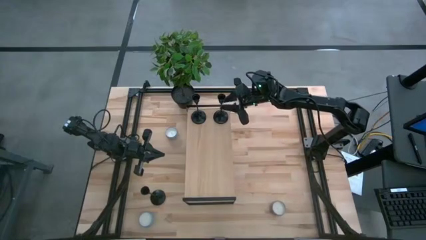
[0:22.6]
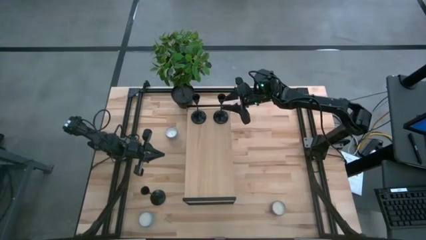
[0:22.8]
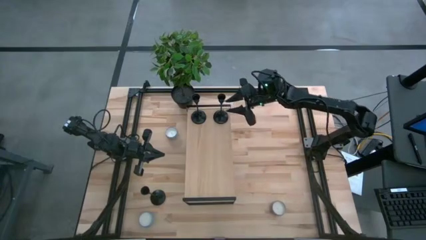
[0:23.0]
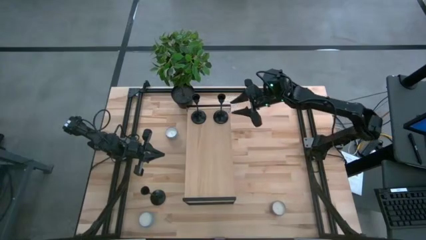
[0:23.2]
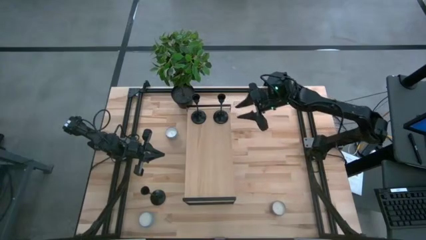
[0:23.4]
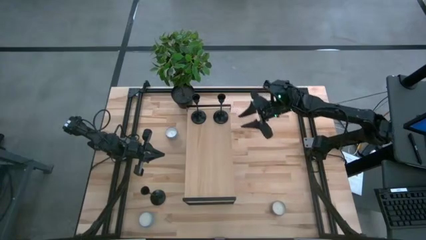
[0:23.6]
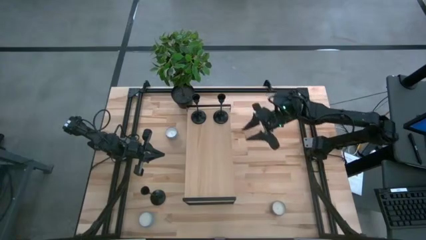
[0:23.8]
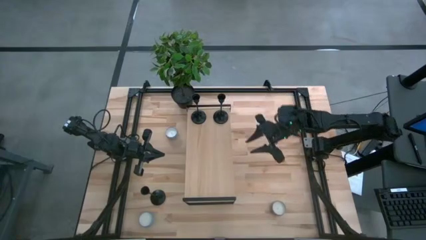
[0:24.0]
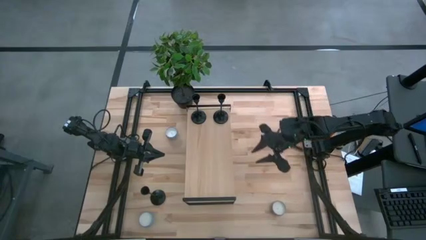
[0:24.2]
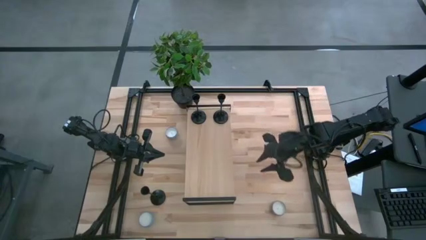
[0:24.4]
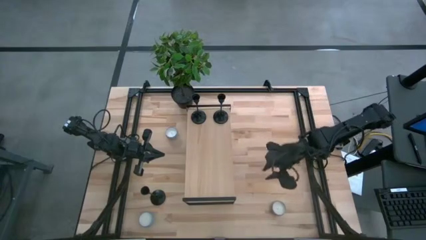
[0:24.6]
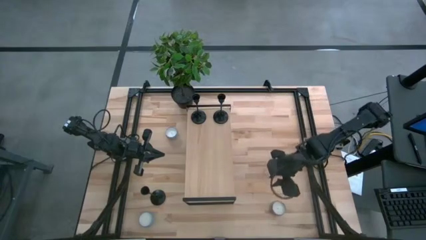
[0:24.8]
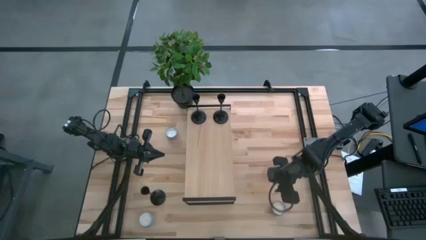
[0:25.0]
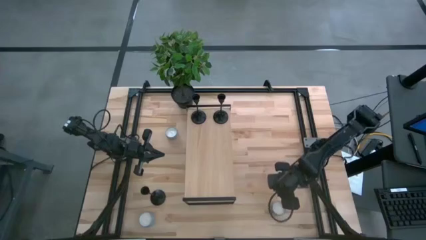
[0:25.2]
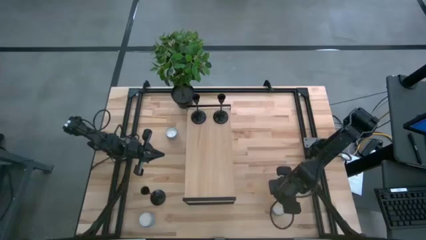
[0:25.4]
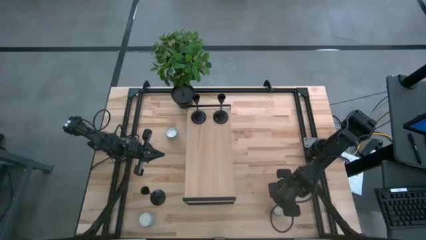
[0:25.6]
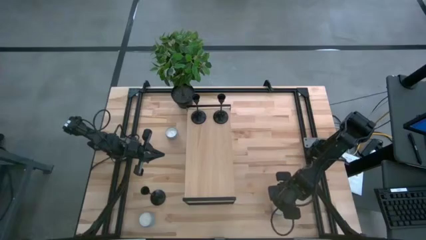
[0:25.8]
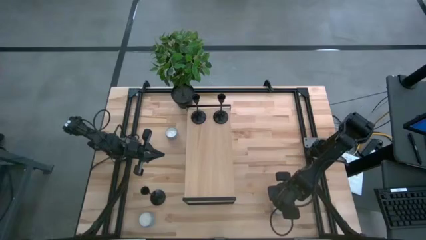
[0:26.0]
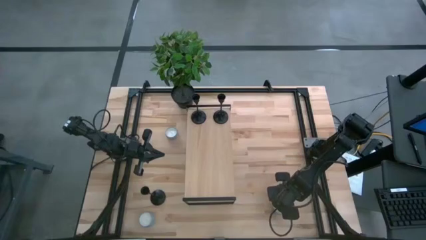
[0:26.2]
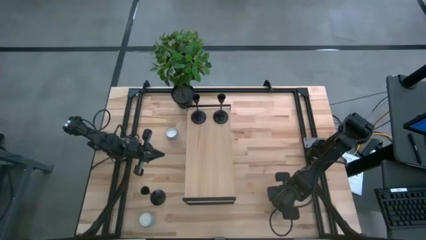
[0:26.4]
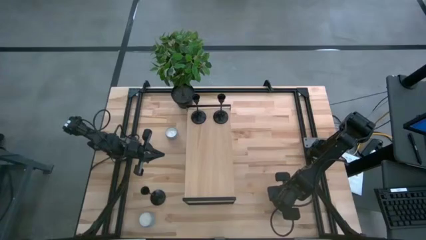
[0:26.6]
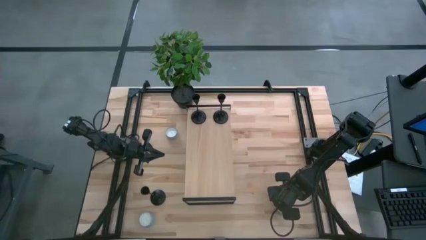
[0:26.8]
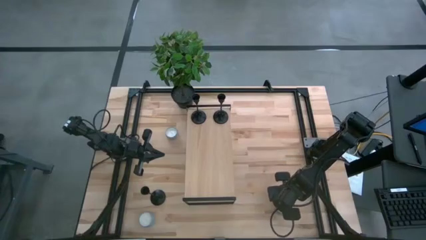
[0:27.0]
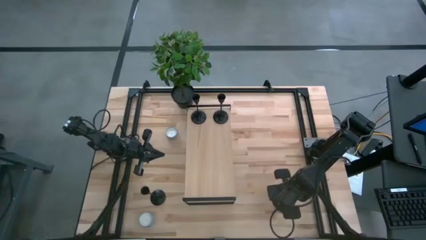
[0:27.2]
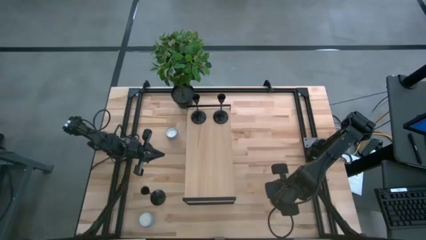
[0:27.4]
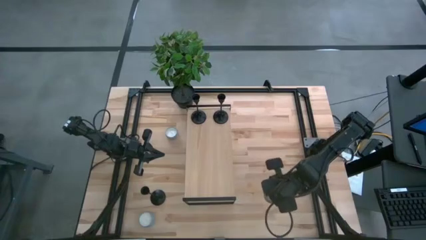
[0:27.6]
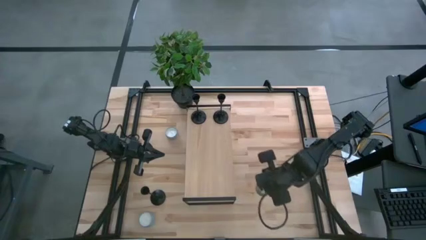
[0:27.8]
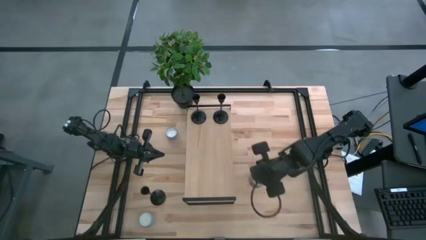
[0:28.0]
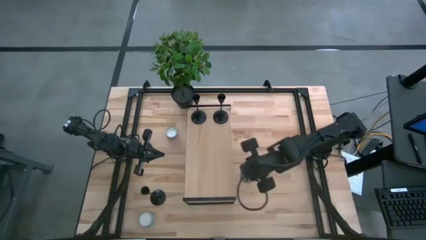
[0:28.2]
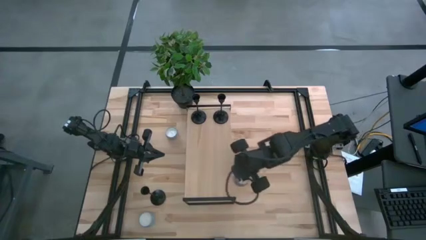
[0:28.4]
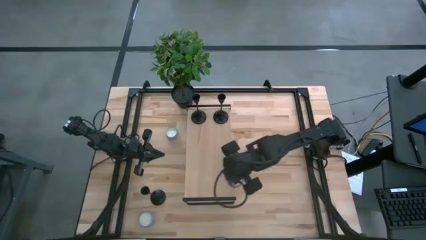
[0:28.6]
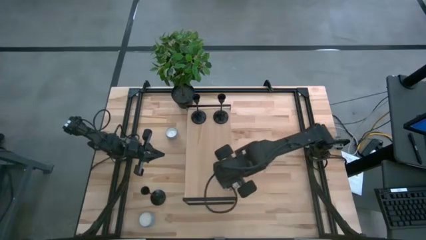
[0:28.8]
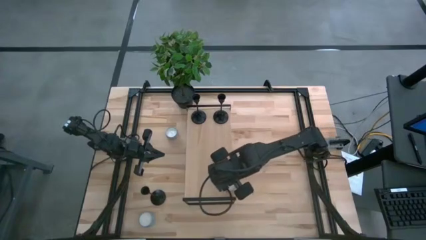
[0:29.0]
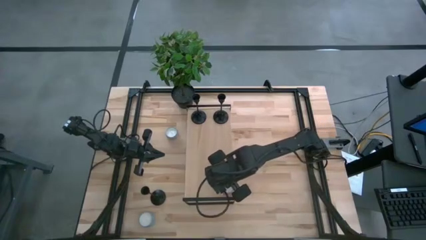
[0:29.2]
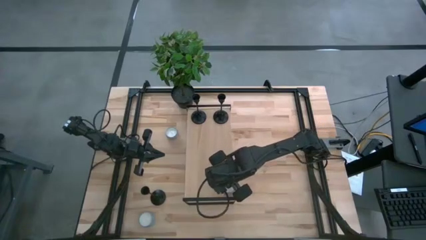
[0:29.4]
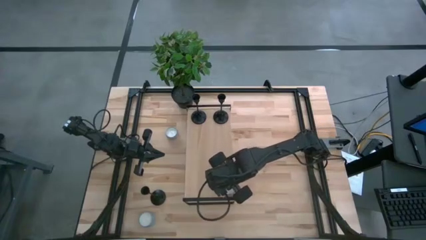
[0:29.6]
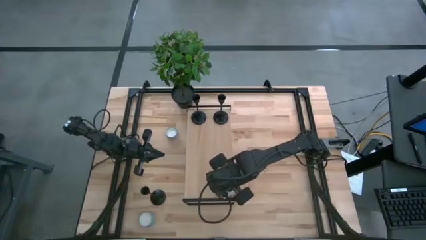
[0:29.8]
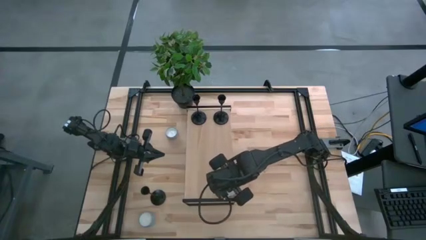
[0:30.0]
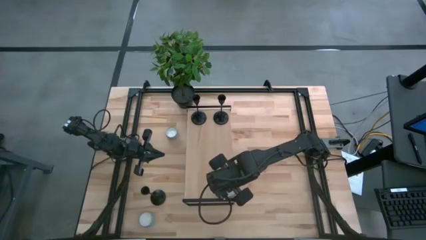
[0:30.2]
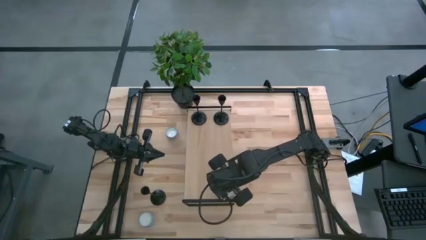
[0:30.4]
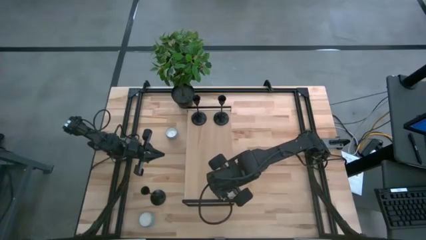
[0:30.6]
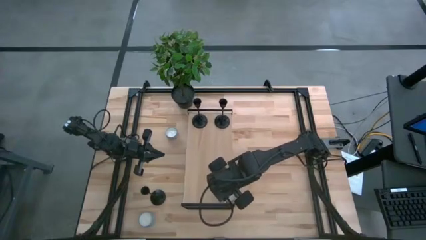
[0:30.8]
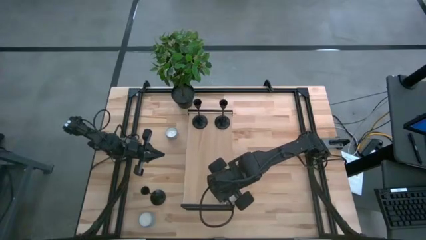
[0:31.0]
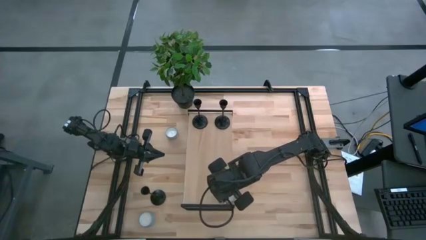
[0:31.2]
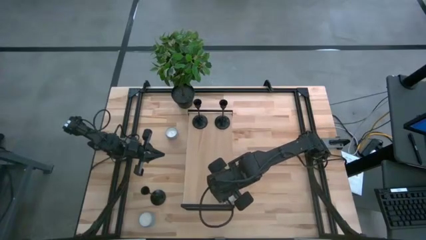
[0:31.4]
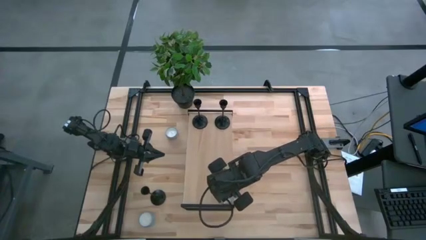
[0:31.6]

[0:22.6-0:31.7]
Task: Pick & Place candle stick holders
Put the pink scented candle on the shelf

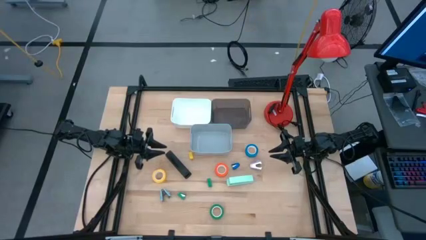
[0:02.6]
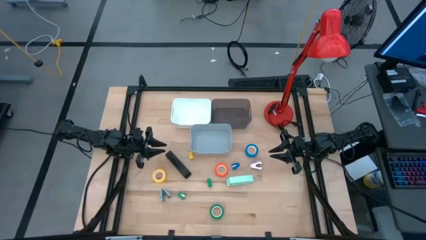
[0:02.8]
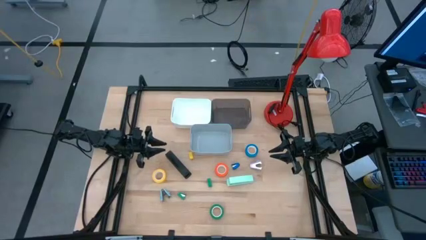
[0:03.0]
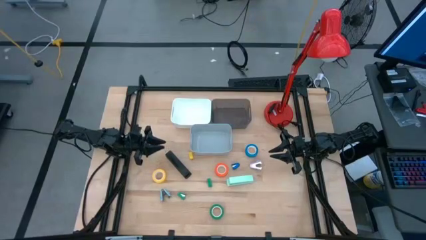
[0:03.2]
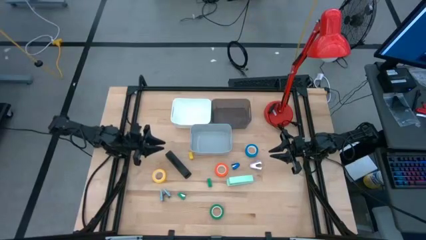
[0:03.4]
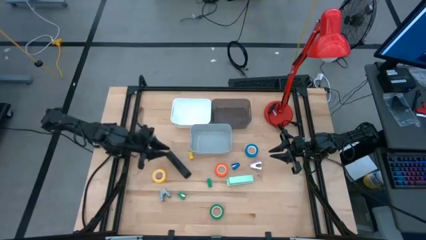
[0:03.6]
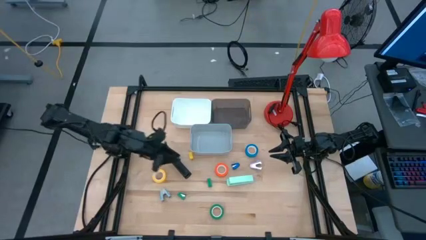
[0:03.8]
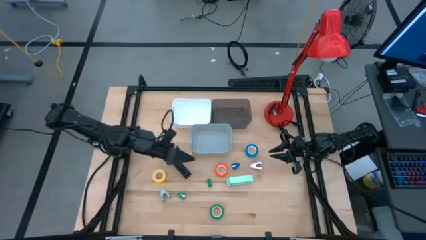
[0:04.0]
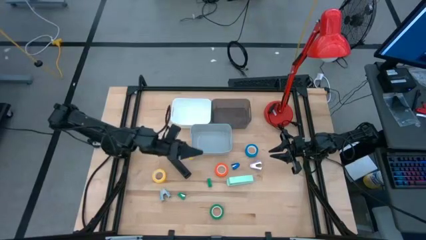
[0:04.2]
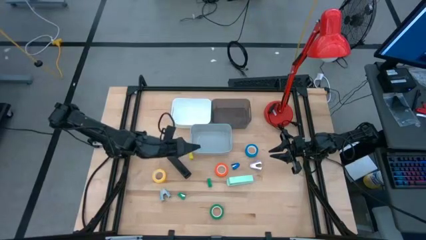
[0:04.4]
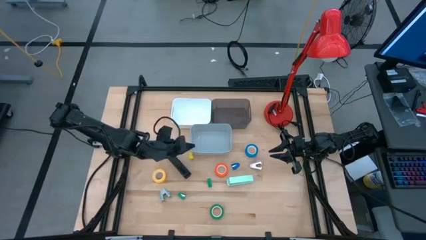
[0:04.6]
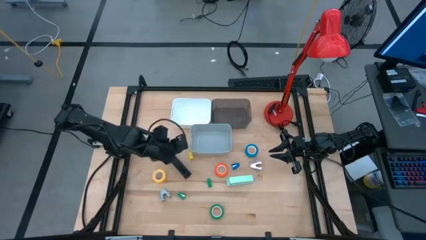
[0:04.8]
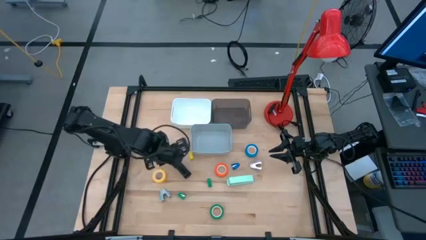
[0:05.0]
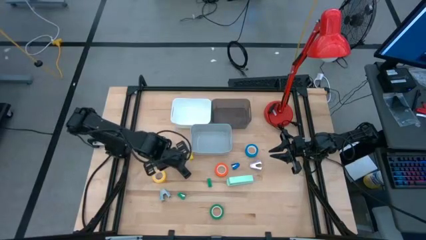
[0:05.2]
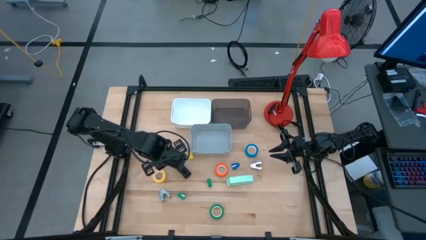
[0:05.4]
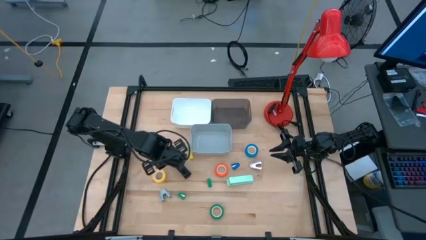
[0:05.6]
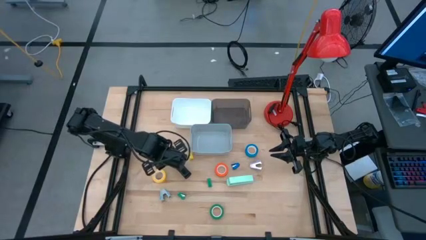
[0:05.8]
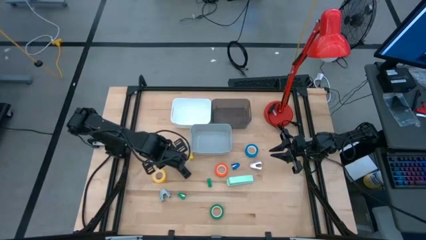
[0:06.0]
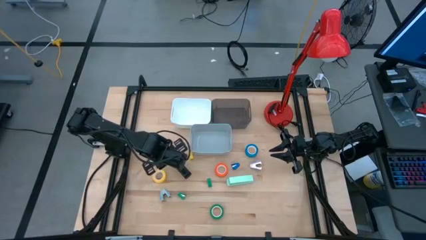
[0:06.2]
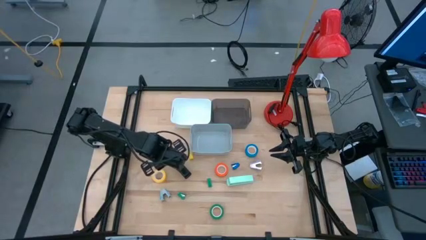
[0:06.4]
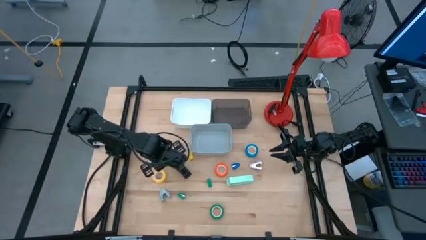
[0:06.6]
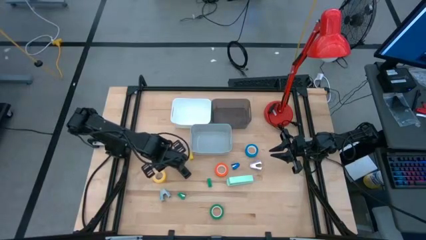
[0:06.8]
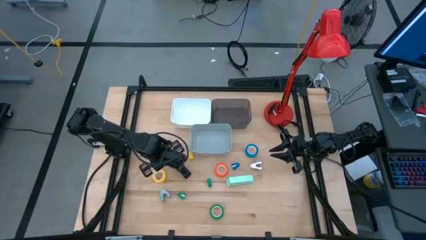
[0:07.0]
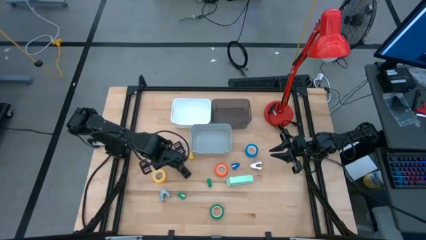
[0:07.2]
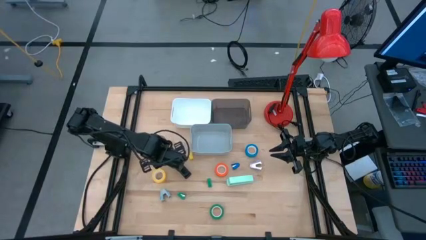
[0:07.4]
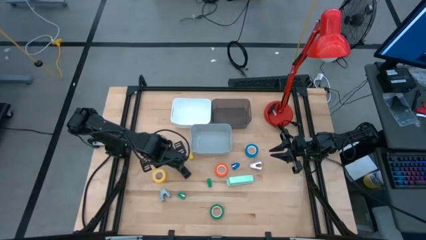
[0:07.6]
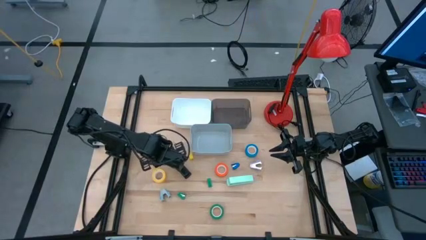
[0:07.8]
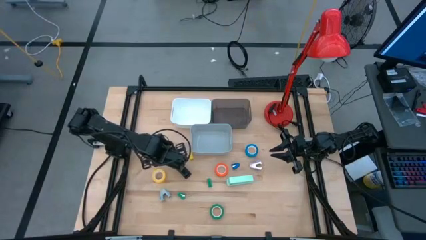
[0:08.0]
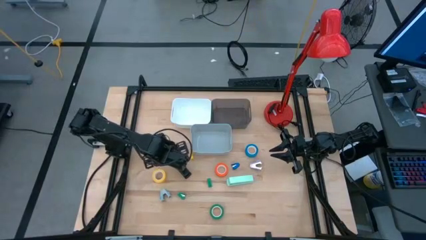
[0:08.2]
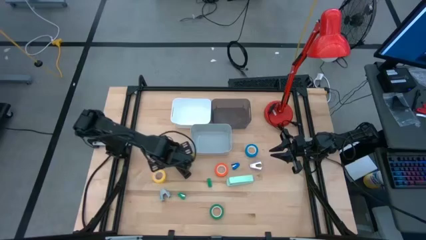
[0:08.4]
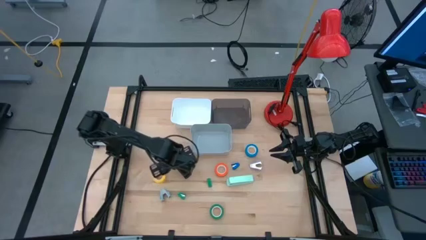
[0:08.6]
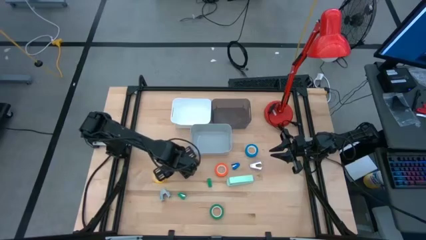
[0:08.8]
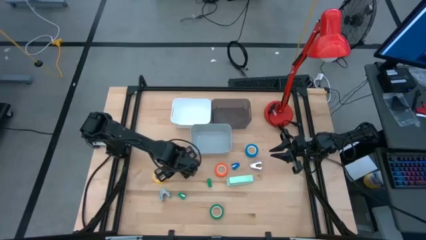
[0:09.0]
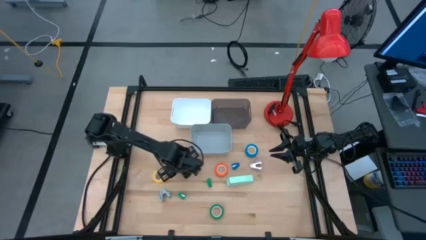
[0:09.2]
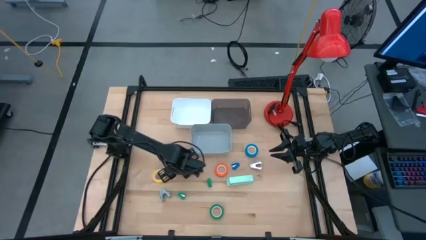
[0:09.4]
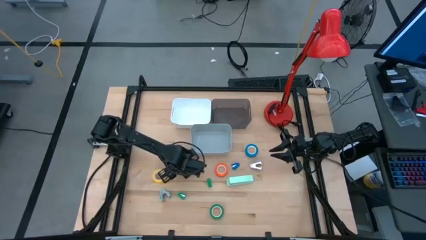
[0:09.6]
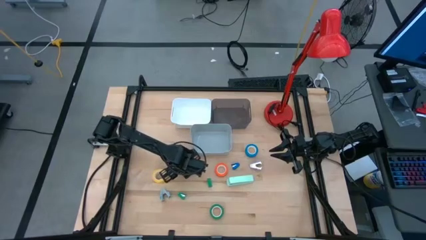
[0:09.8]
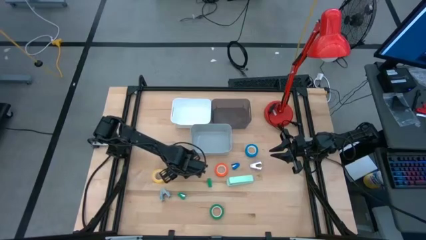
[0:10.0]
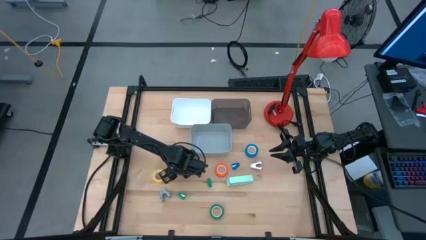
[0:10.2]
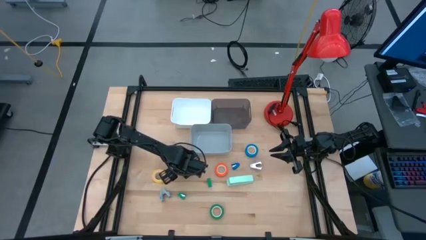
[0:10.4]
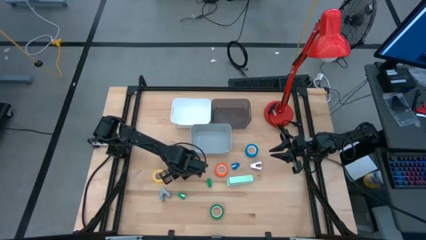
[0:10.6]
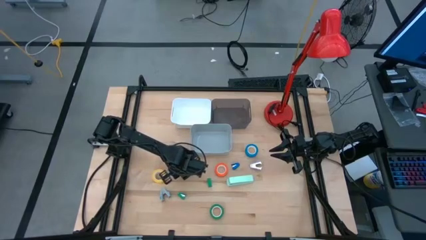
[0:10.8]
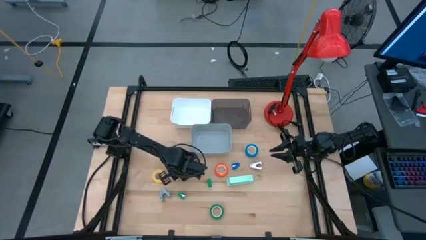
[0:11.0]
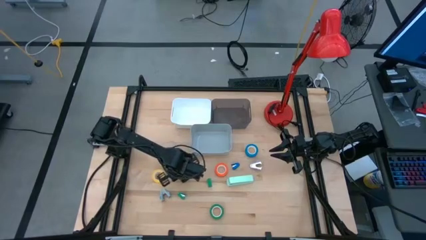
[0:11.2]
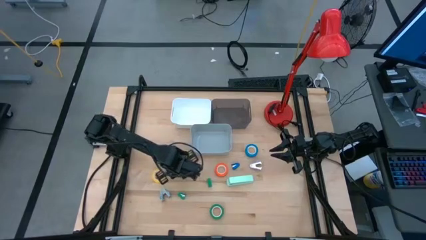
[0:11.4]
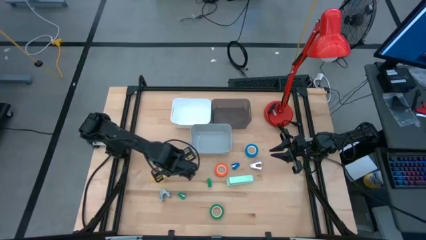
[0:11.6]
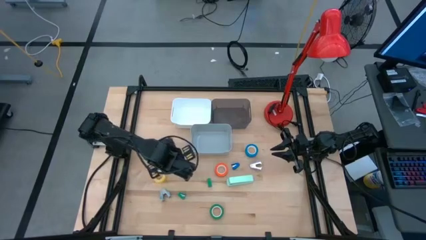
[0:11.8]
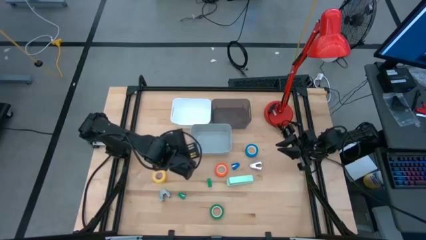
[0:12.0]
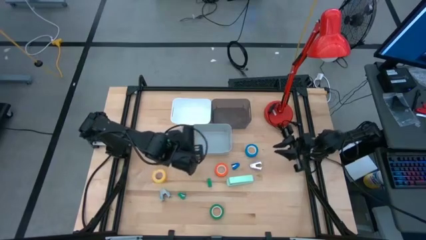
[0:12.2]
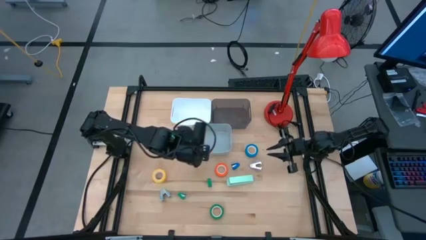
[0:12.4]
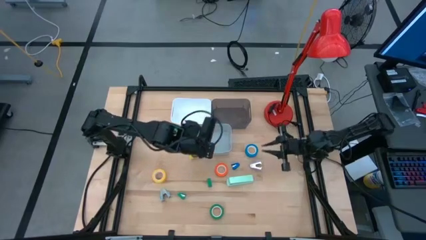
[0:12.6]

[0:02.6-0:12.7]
Task: Pick and place Stapler, Stapler remover, tape
Put the black stapler into the black bin
